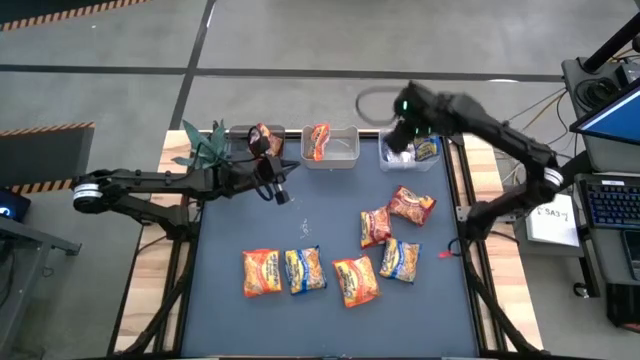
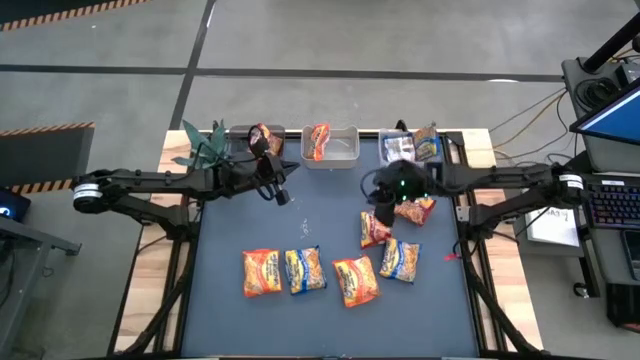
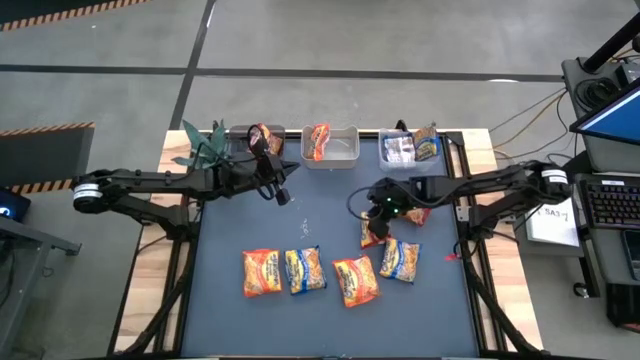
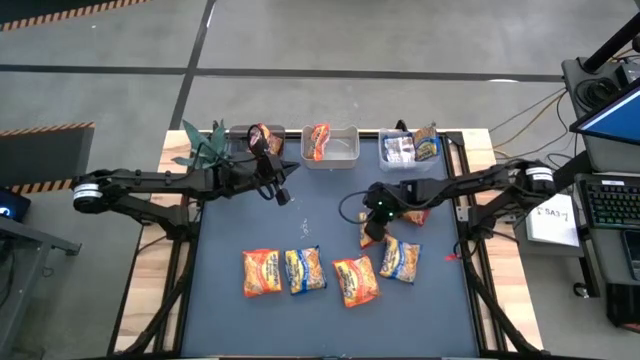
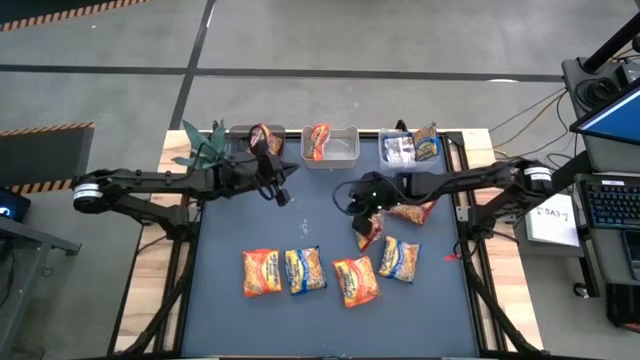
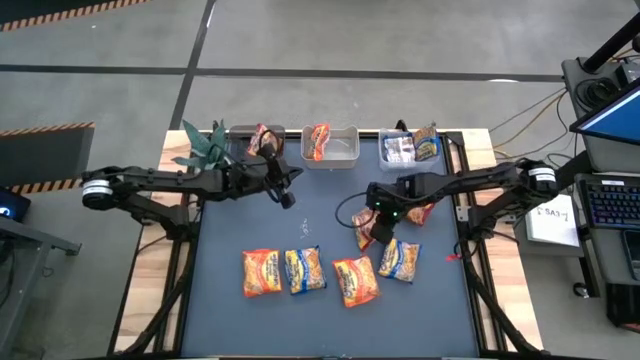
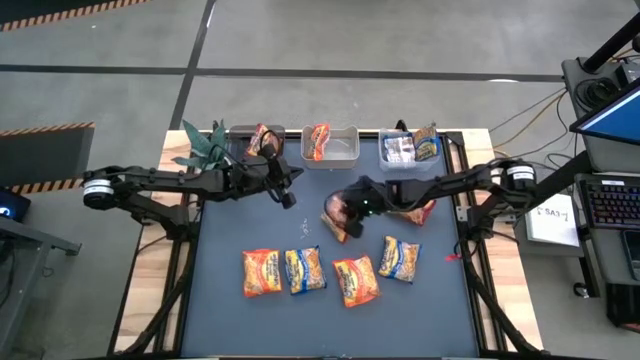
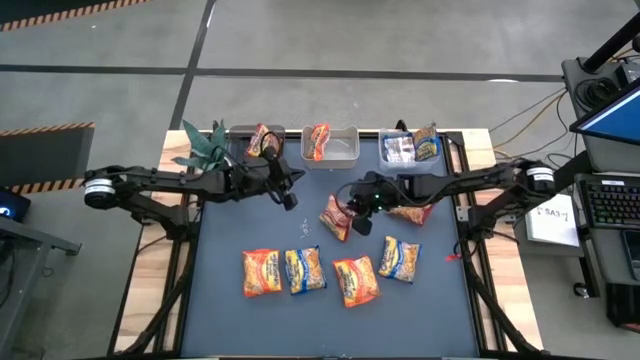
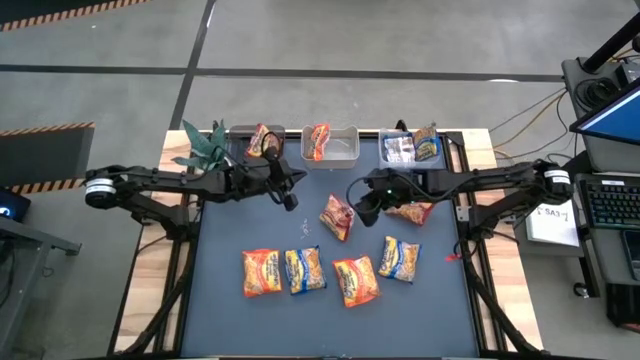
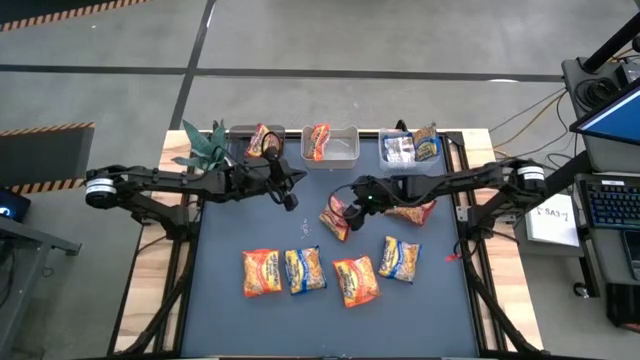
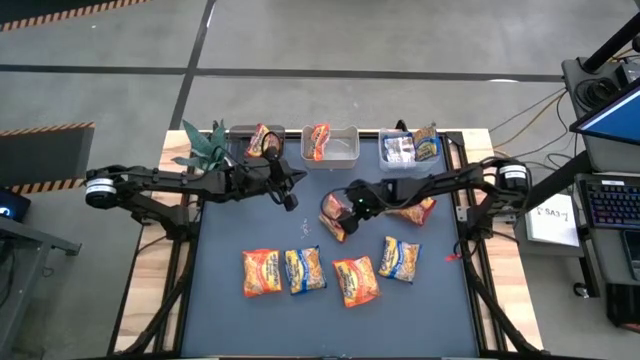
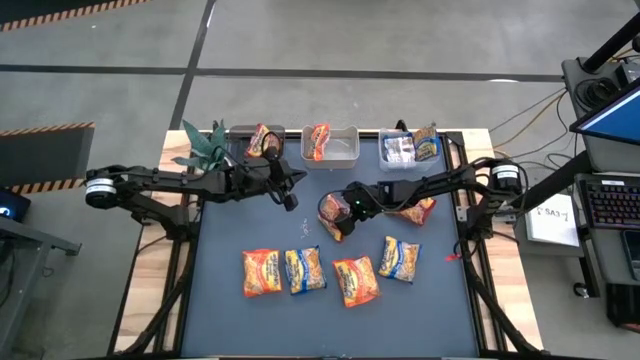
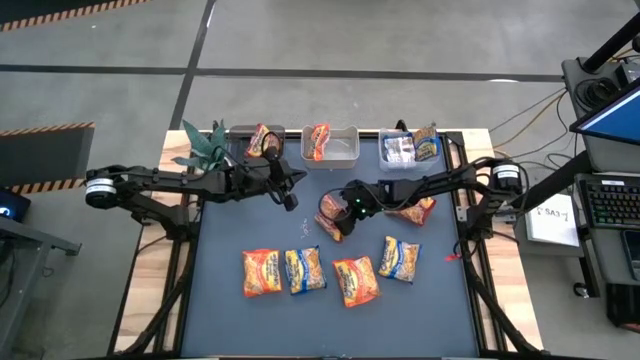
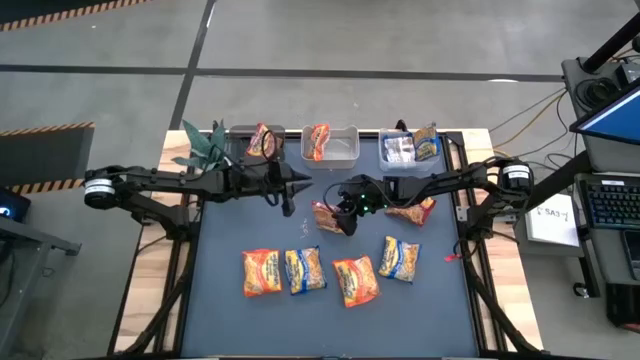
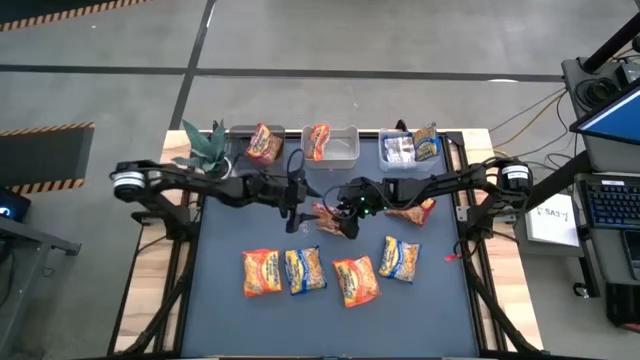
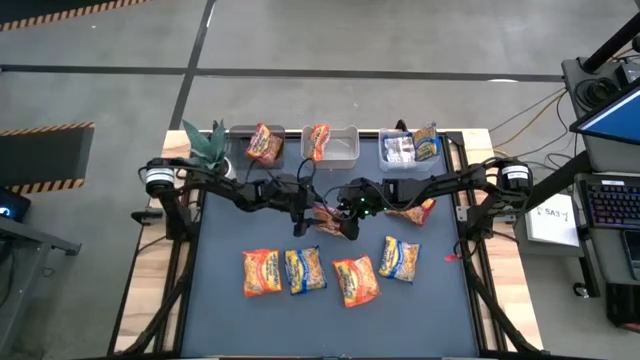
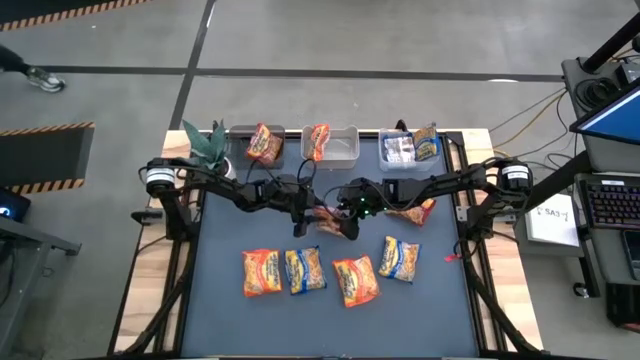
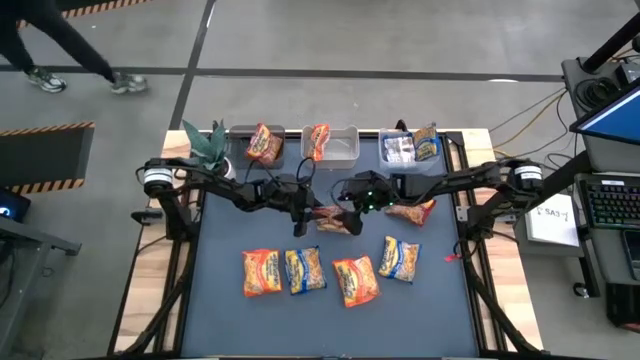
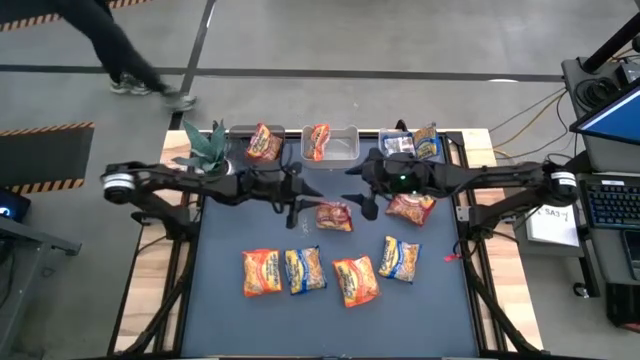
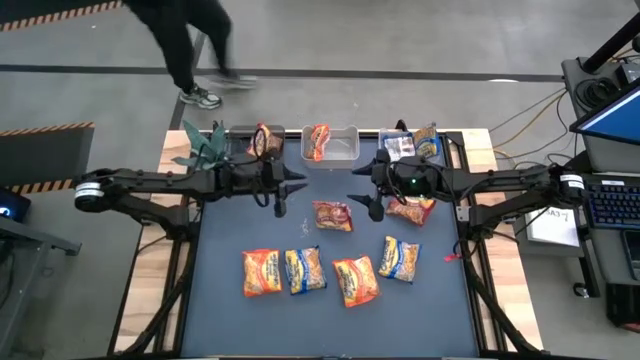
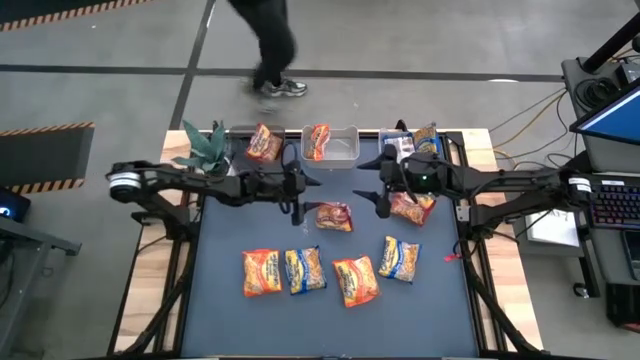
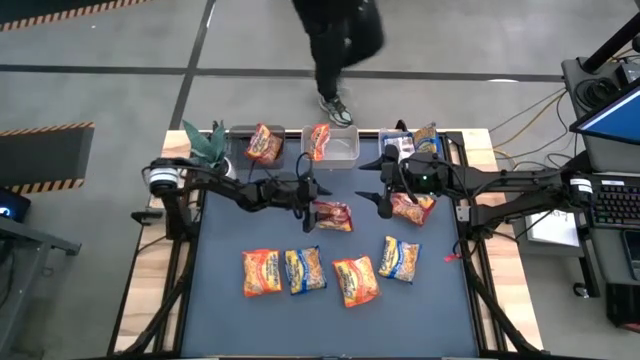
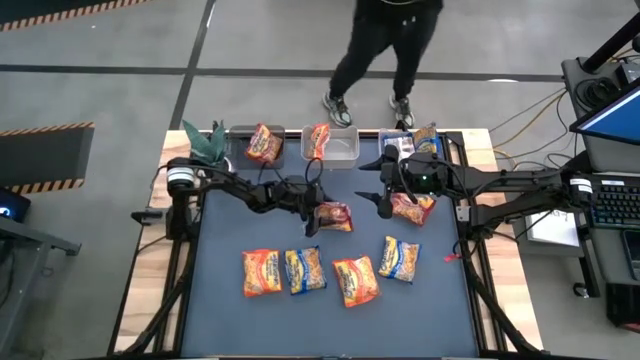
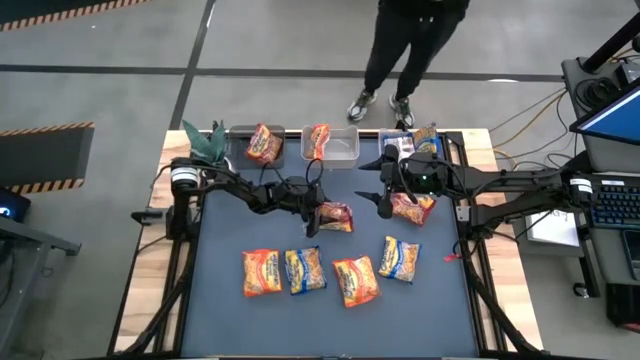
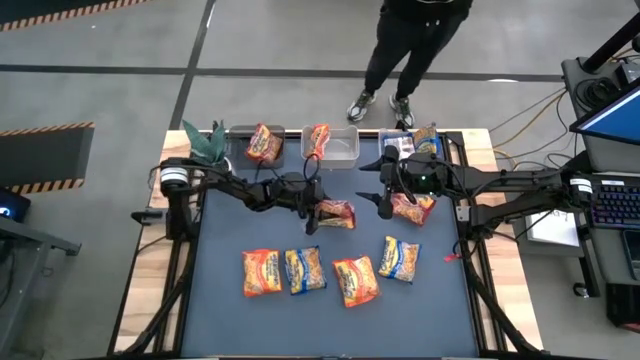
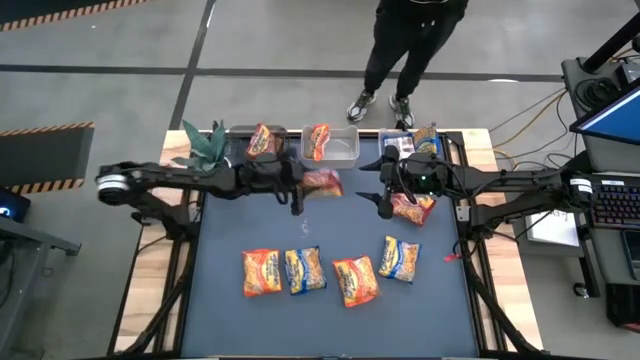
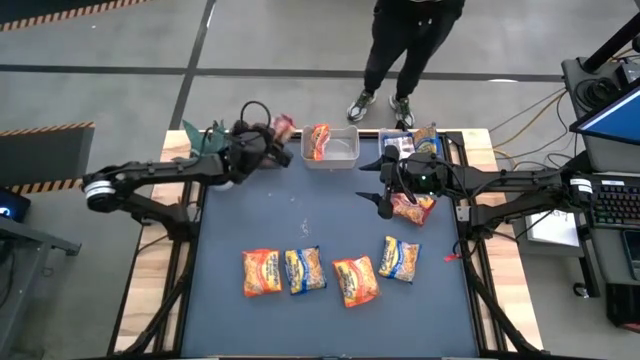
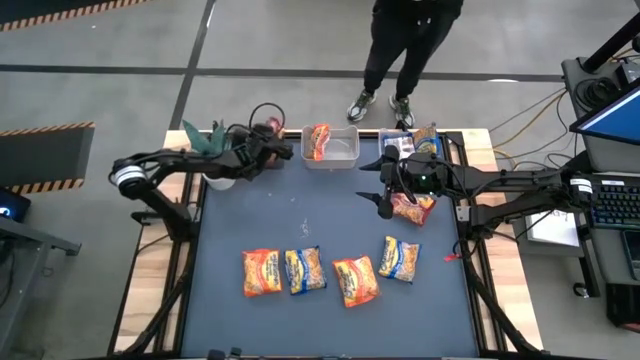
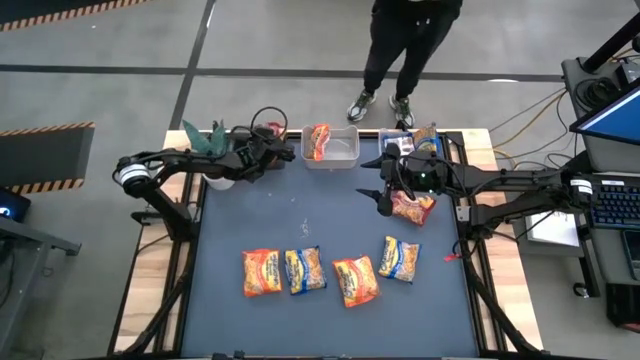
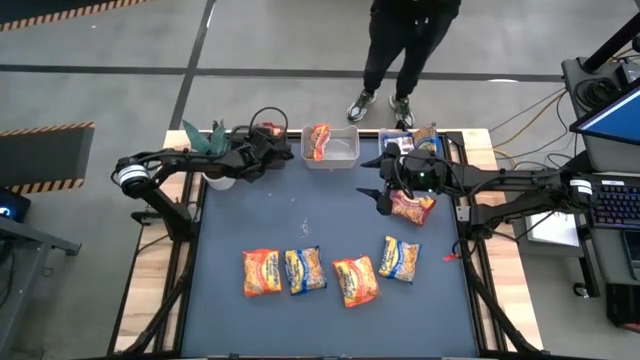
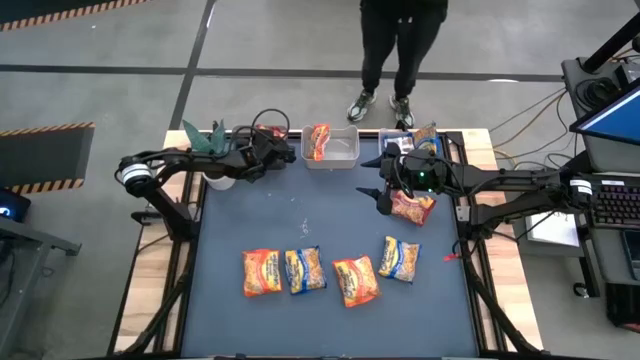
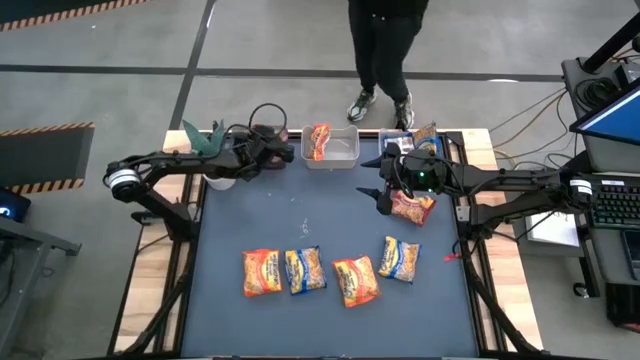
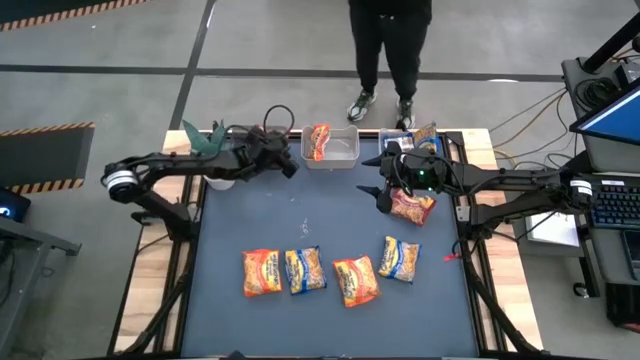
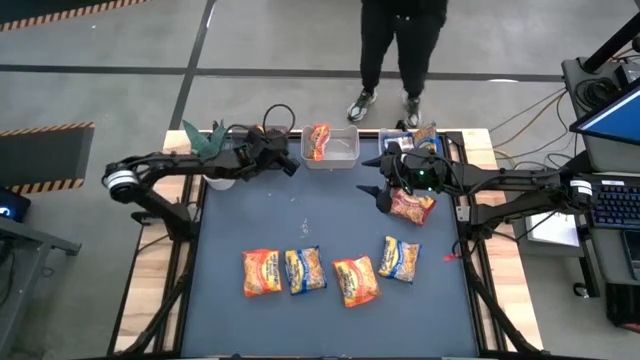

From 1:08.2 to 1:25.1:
Task: Sort Maruchan noodles
Put the left red noodle pack into the transparent black bin

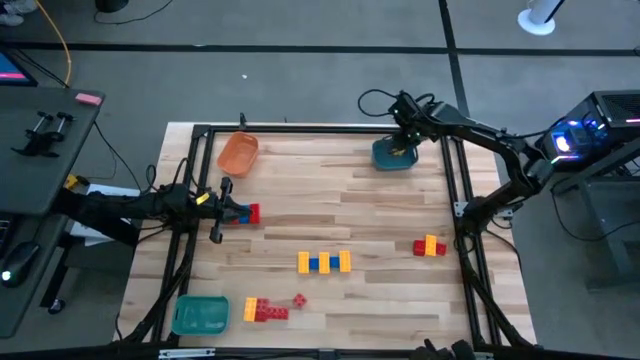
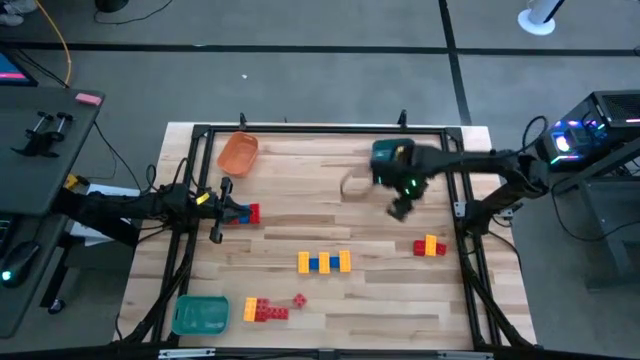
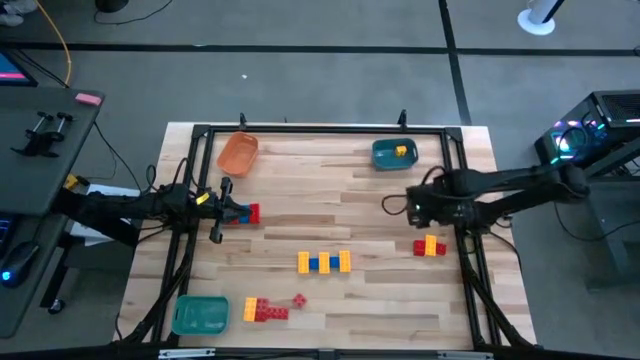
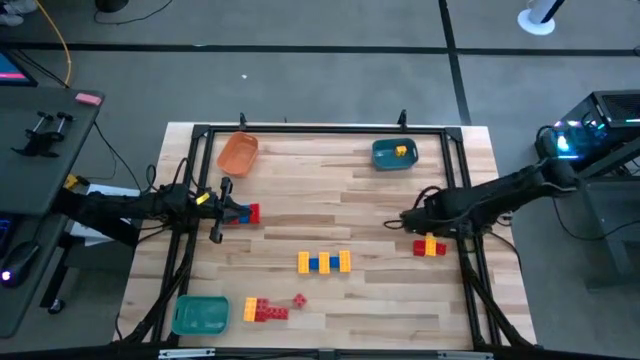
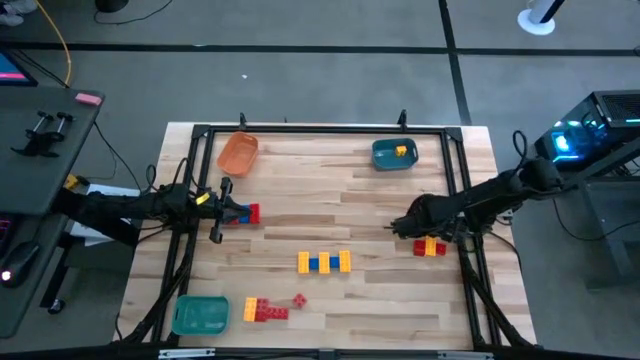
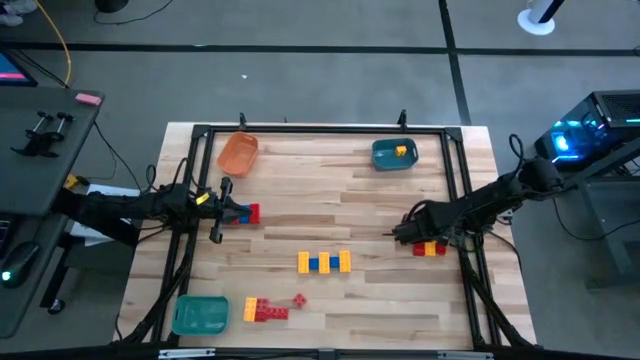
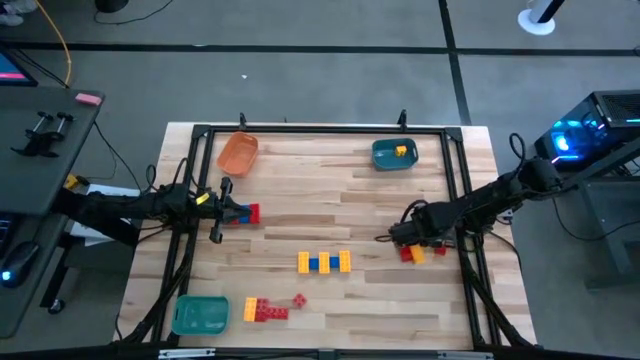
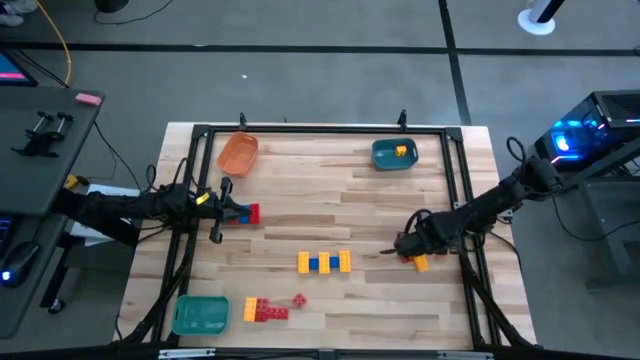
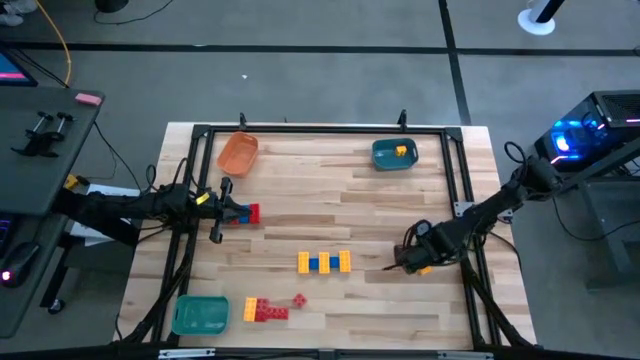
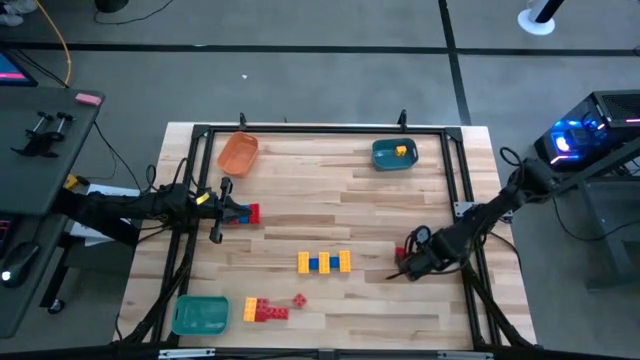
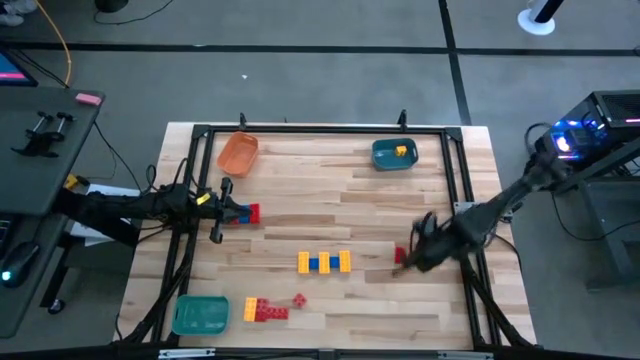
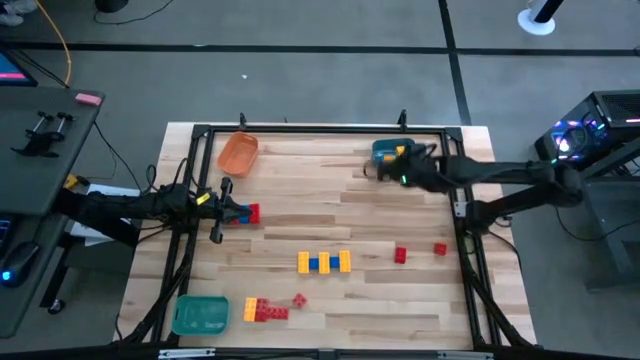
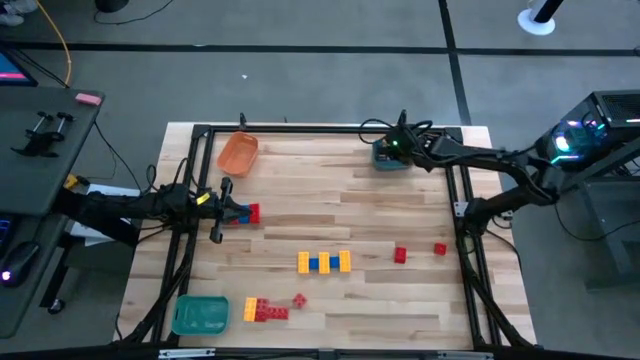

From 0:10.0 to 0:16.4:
Task: Sort blocks
Put the yellow game piece into the blue bin
